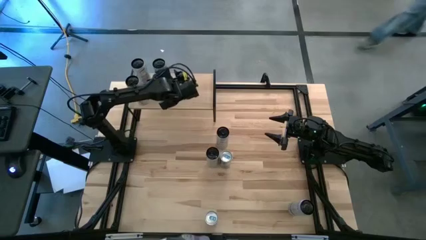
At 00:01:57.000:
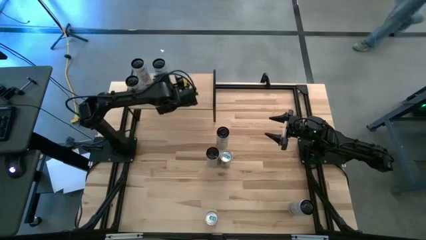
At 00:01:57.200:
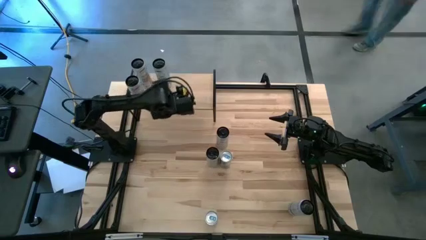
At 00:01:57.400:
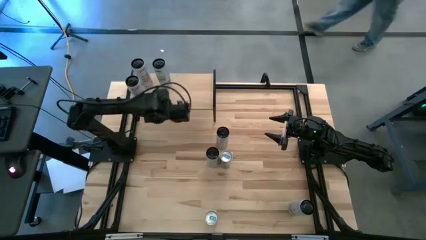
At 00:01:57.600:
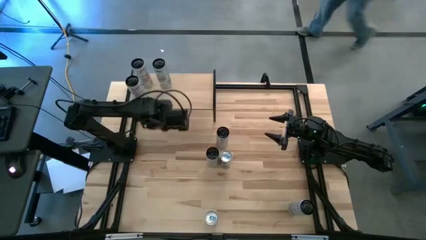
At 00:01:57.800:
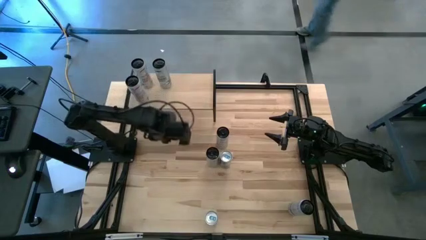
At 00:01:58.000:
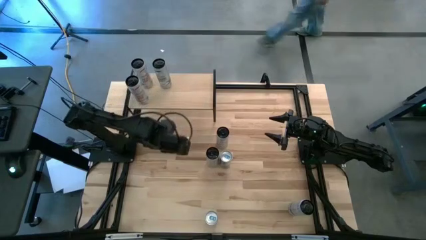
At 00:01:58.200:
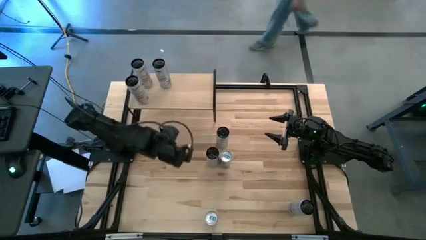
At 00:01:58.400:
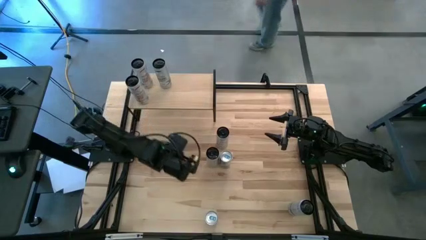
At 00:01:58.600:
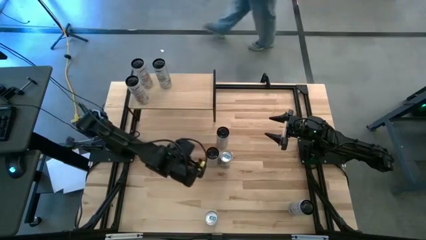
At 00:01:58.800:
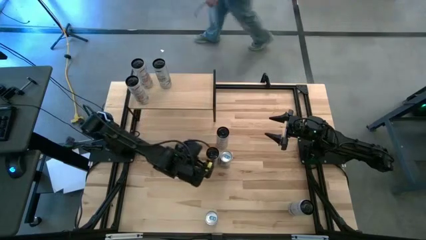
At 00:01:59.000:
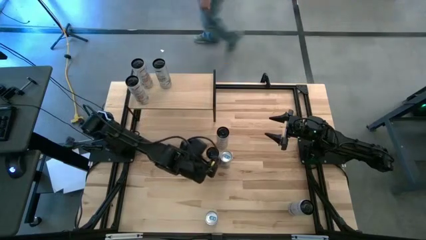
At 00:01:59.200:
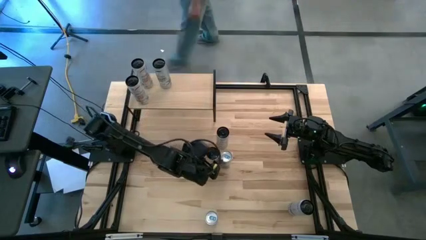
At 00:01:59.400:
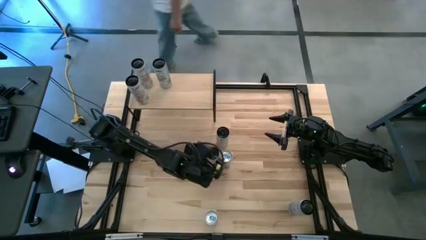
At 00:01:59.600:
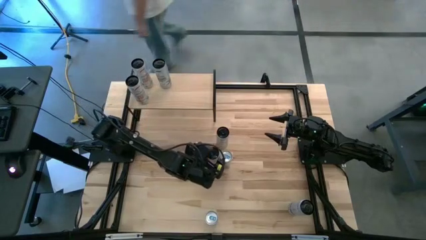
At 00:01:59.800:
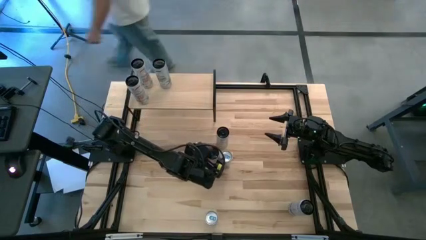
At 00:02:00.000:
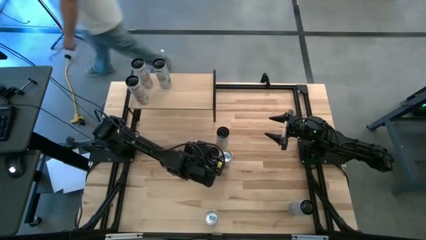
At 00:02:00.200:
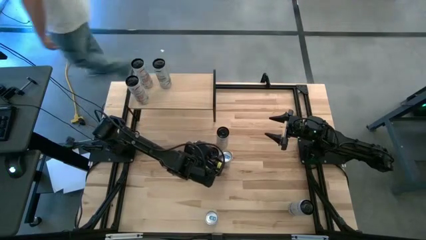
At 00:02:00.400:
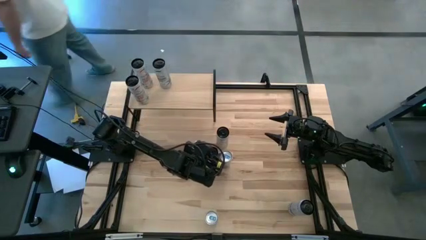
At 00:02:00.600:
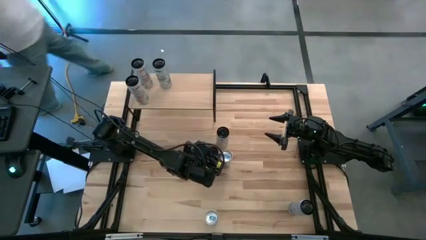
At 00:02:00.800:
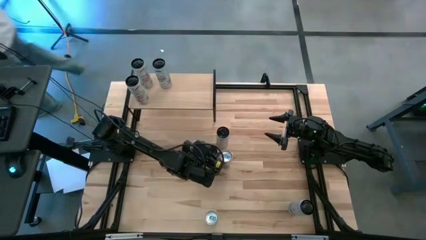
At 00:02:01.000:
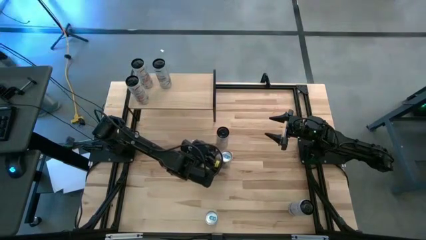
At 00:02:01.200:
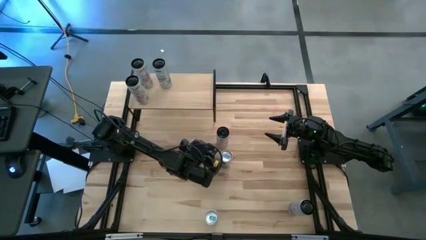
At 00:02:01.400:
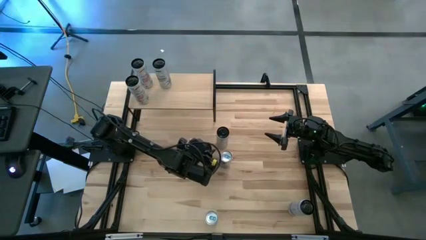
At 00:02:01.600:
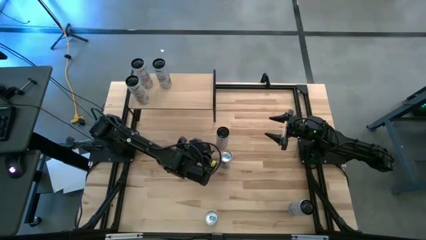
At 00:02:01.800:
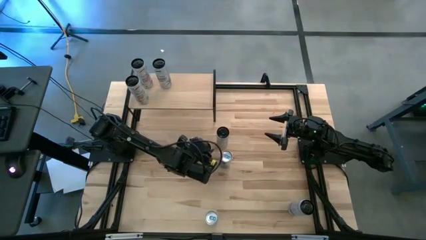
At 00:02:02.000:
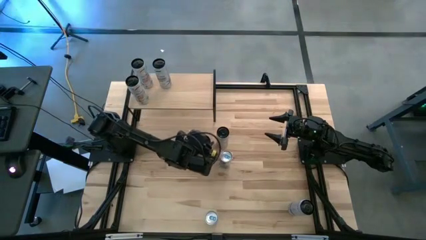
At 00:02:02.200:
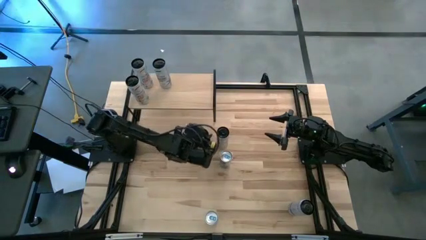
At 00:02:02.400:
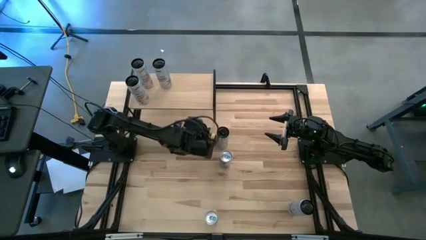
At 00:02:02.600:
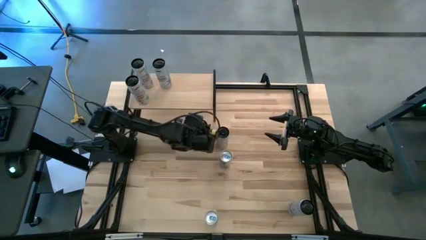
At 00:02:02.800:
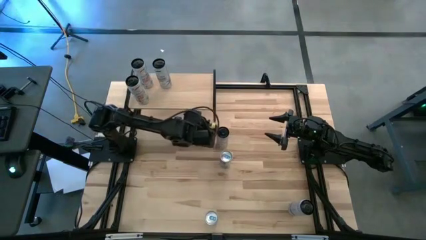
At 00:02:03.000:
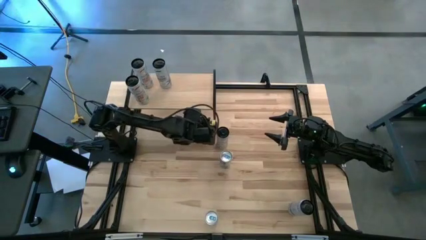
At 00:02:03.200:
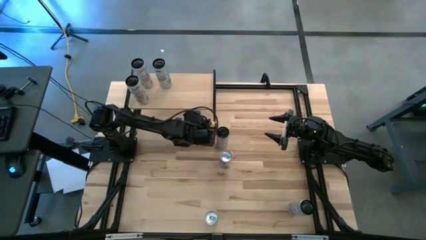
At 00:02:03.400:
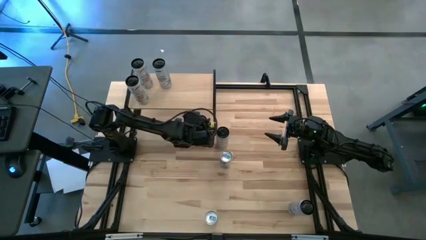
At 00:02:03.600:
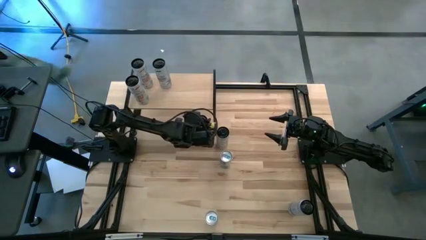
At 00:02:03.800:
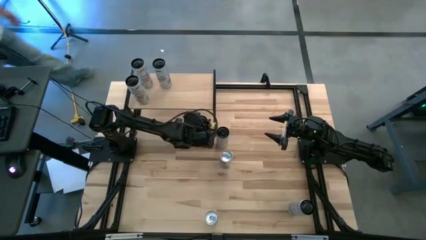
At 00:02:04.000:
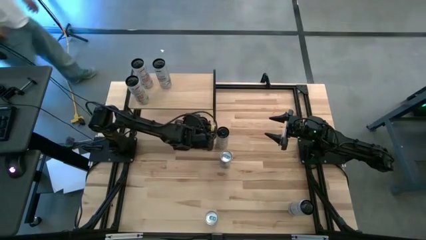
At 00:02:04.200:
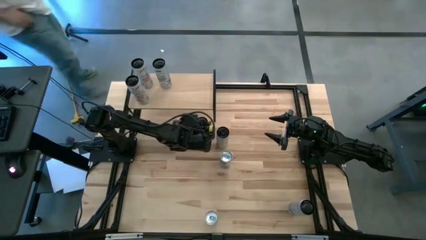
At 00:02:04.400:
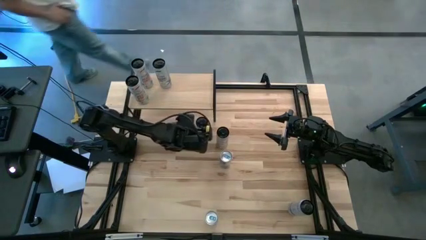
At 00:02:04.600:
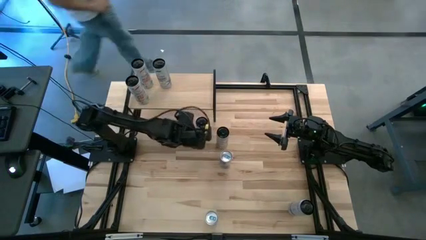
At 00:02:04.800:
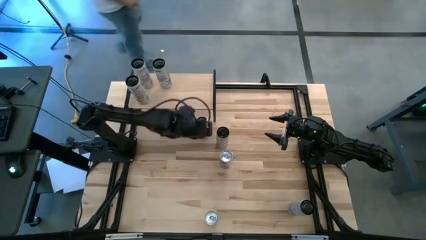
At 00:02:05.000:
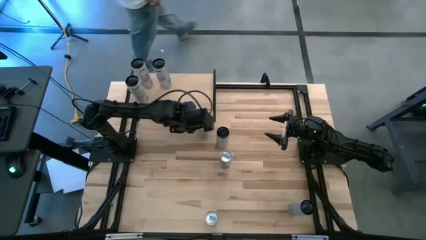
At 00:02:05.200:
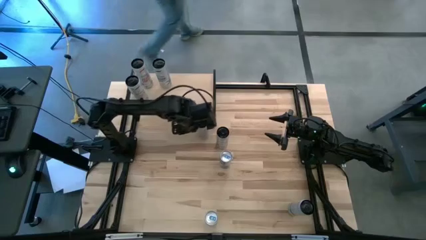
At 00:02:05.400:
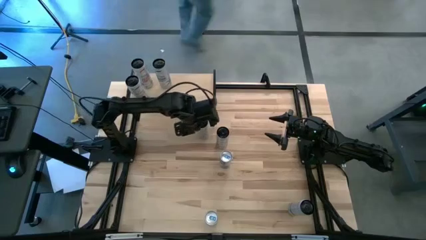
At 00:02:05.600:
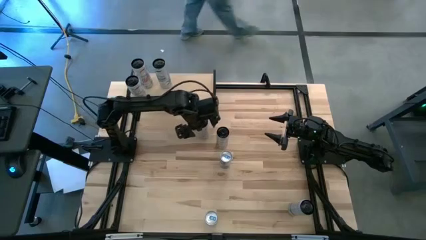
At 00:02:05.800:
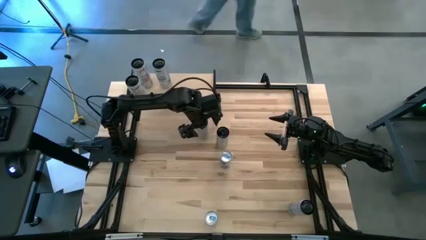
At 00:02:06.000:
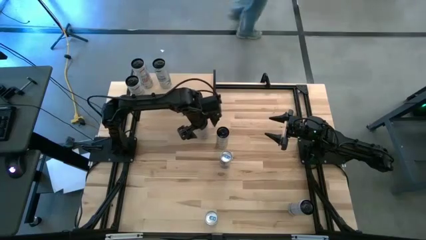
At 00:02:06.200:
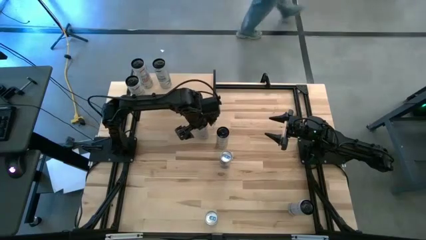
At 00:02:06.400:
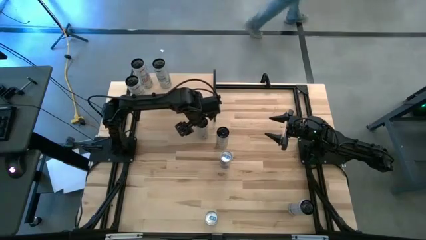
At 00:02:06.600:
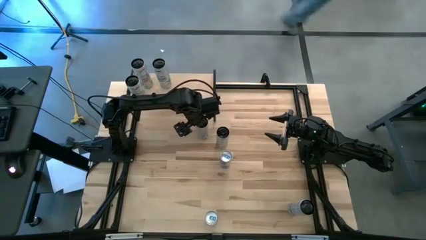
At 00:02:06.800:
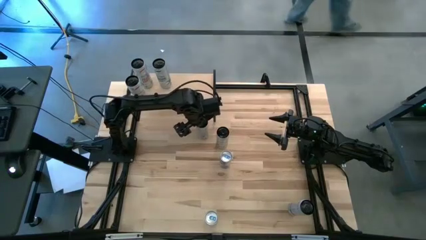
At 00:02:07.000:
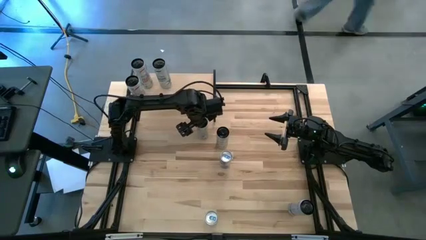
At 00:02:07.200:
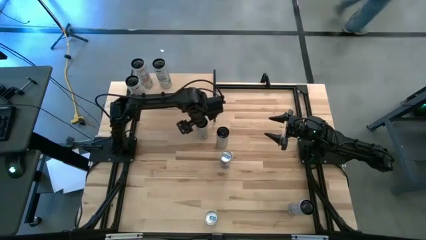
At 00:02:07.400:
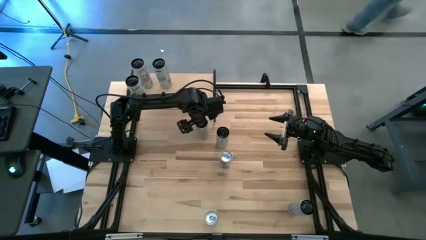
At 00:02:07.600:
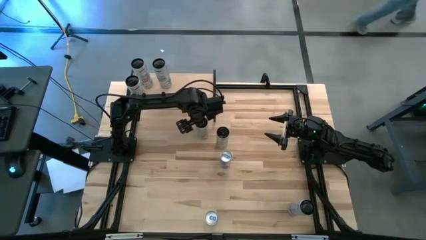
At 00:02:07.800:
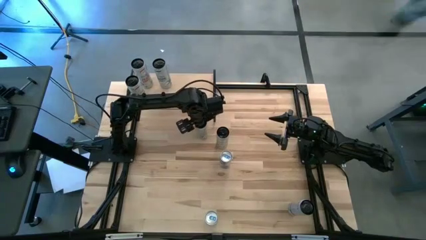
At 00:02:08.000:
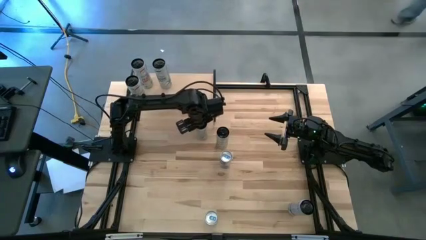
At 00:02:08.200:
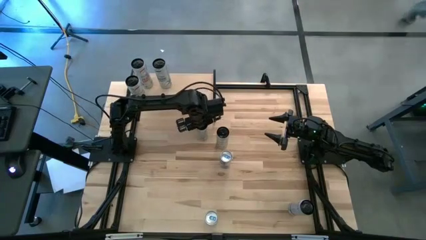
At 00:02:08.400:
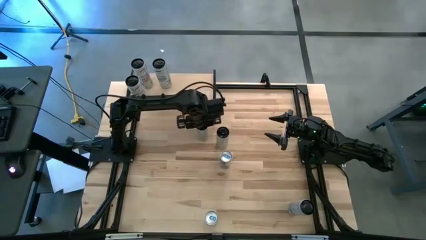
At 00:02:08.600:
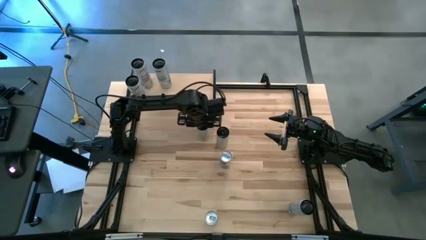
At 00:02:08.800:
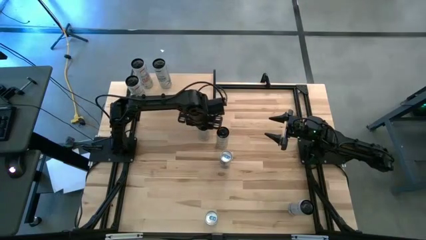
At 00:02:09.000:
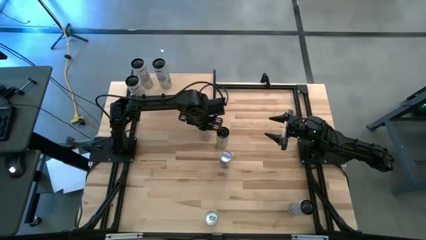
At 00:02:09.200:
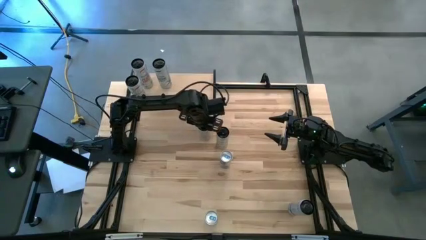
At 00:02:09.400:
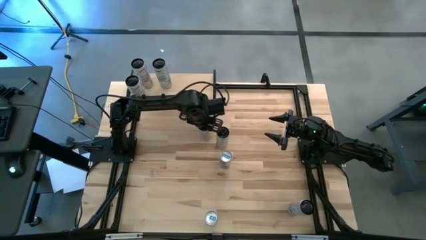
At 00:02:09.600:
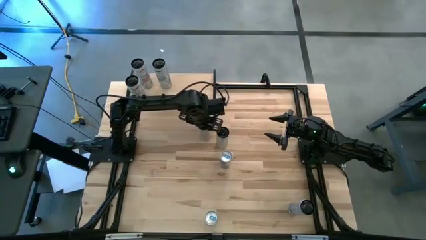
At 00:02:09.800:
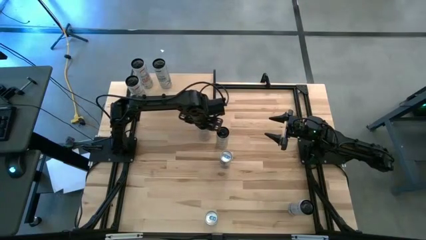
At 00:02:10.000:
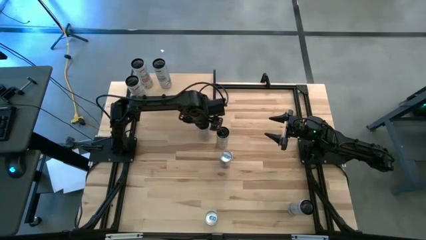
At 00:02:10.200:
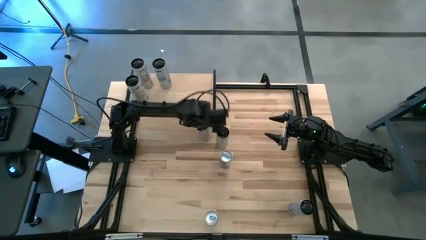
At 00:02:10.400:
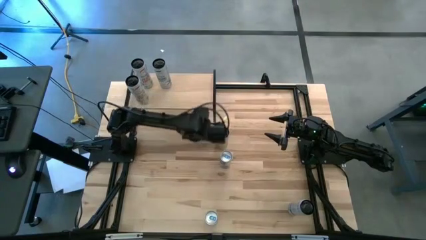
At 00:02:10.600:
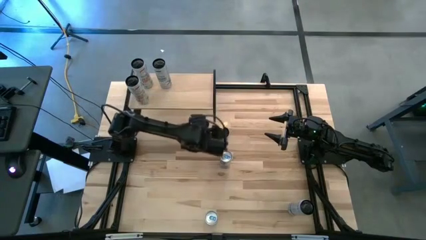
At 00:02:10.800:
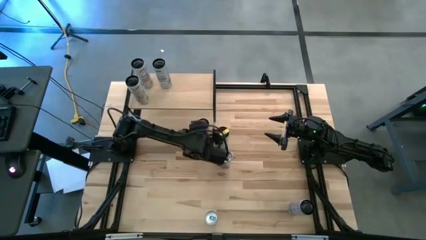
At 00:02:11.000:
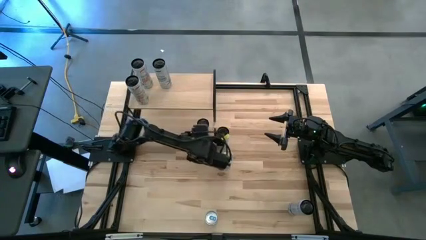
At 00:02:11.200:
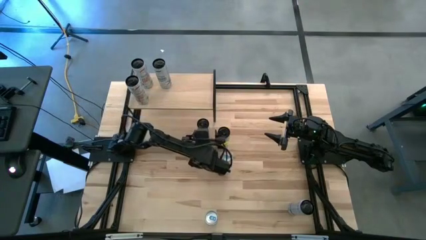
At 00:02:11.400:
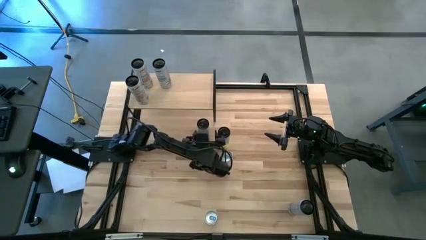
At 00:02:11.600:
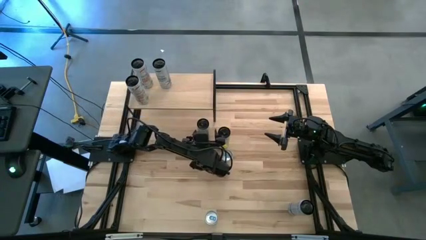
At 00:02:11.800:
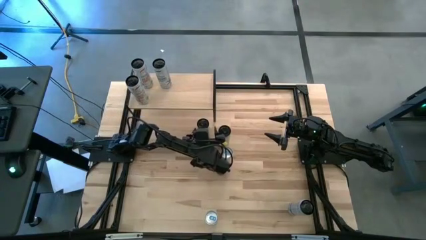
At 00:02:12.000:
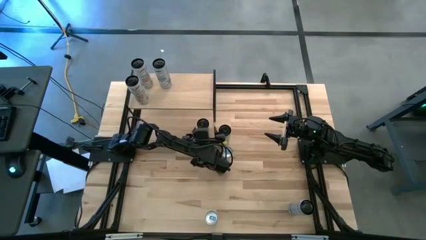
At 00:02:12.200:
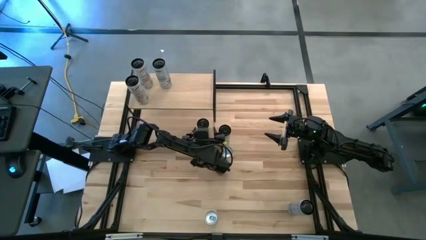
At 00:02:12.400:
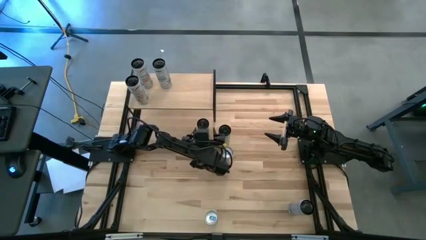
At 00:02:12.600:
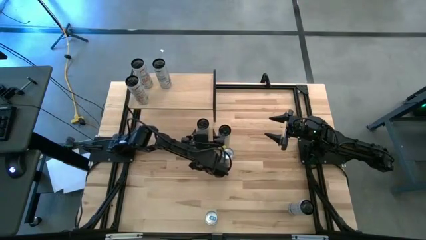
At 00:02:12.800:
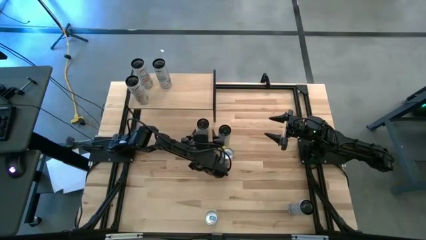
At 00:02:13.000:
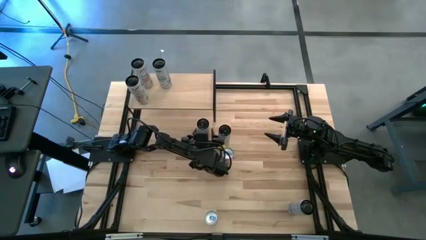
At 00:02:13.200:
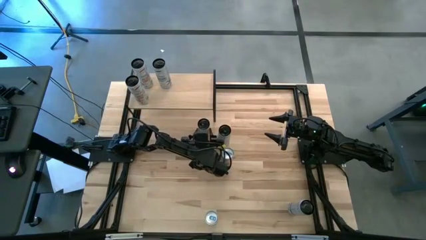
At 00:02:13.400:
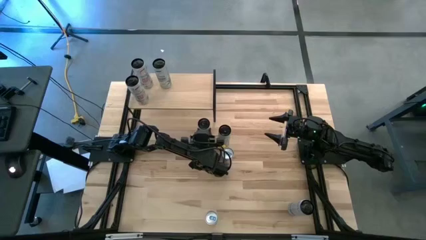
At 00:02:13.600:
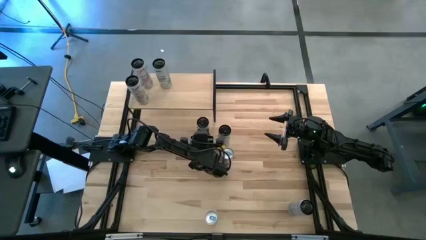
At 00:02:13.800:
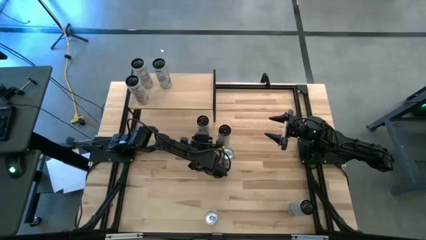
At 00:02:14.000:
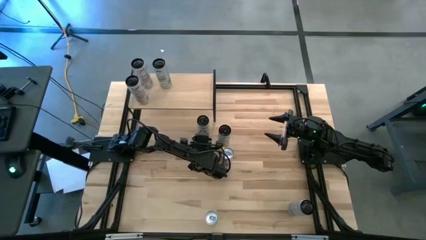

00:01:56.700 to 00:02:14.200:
Task: Place canned beverage on shelf
Put the bottom white yellow soda can on the shelf
